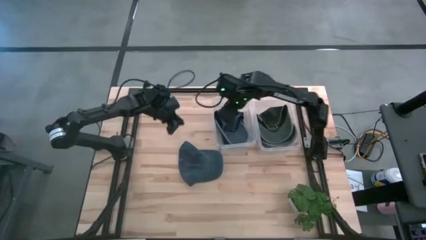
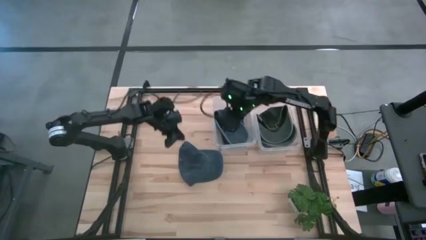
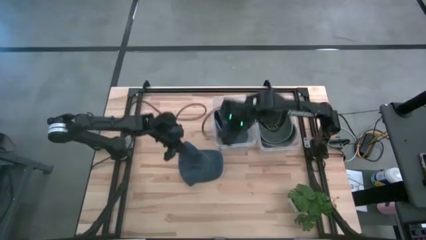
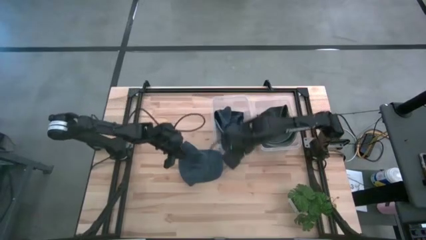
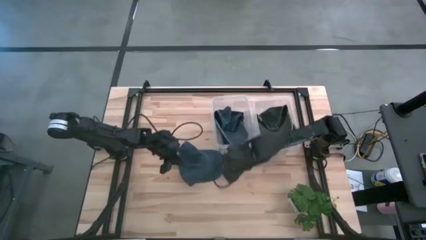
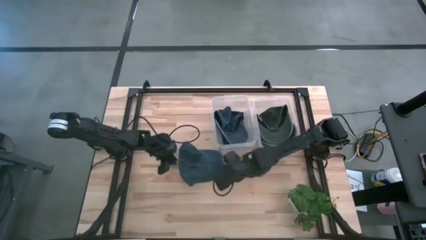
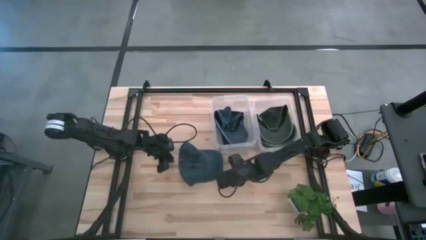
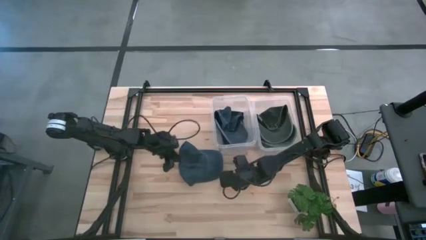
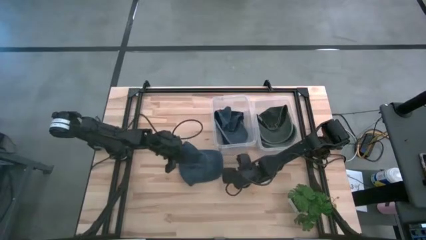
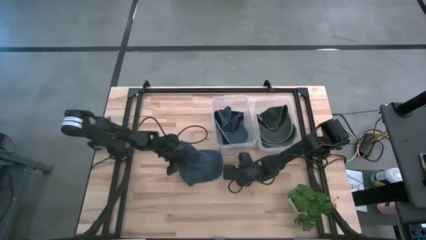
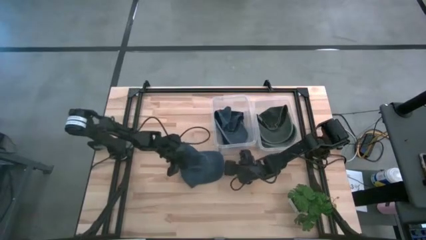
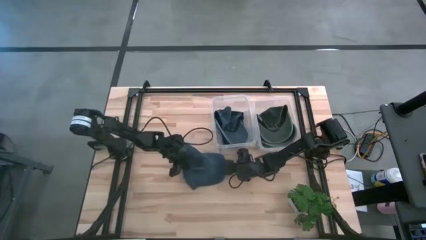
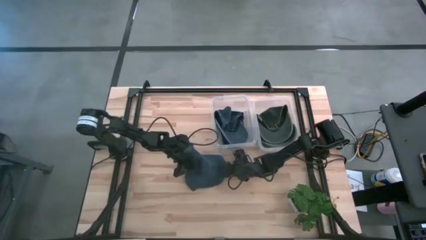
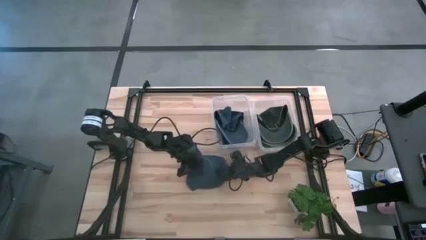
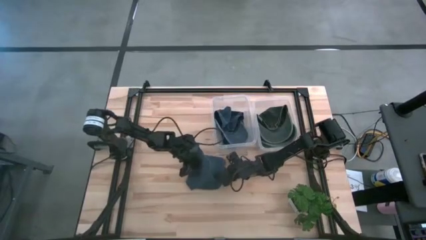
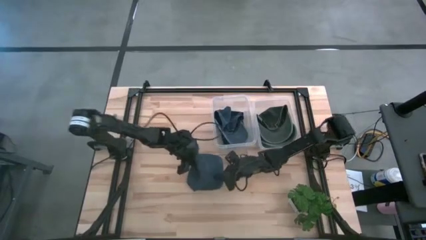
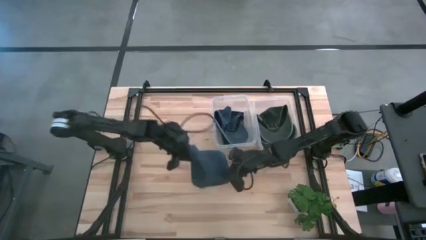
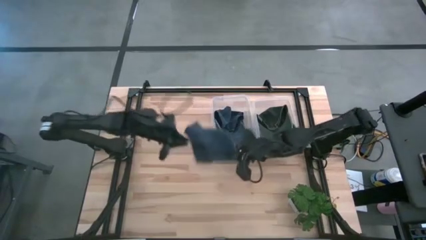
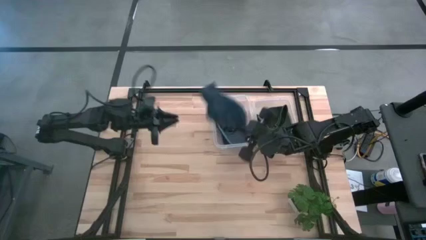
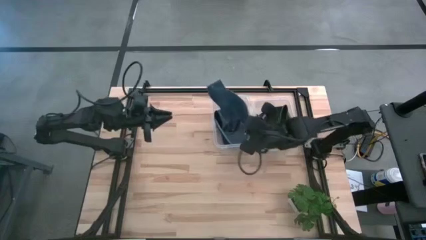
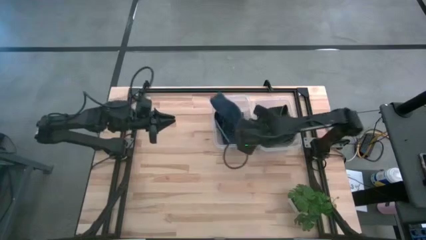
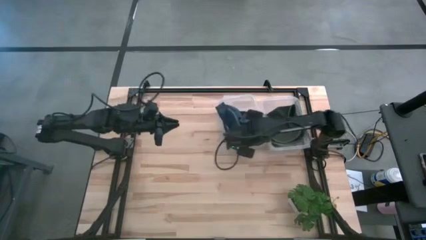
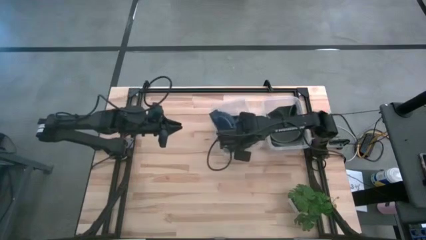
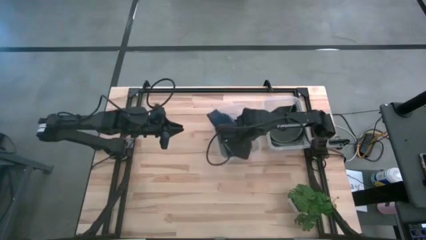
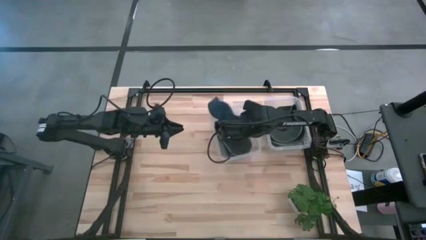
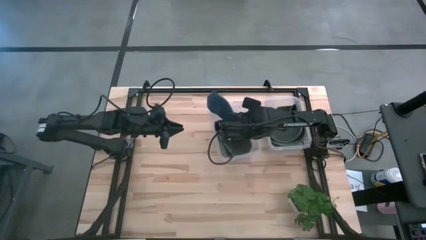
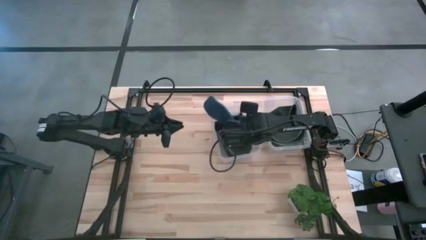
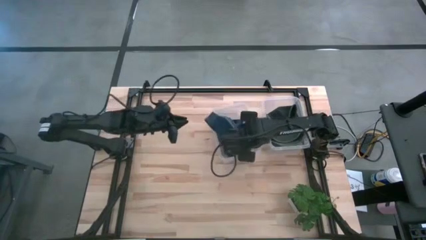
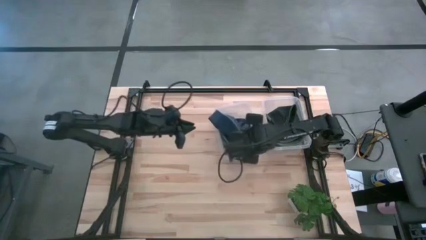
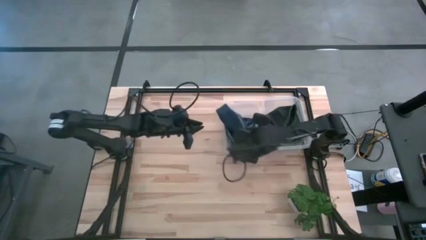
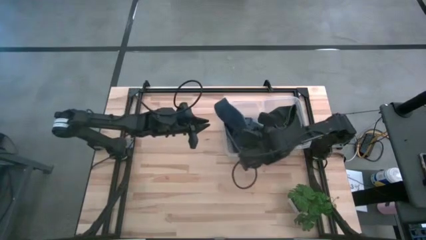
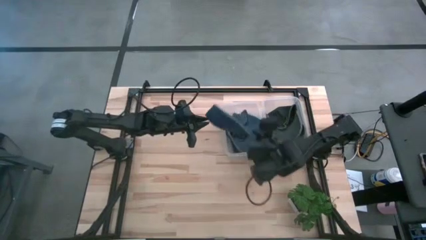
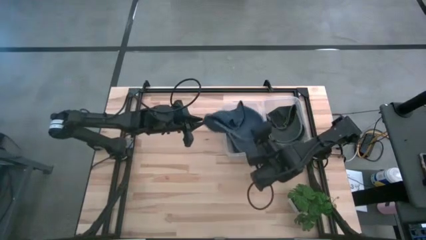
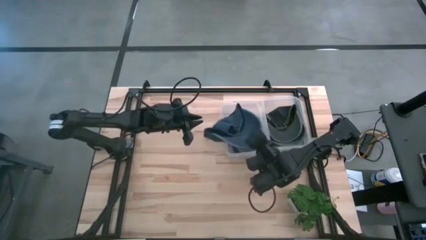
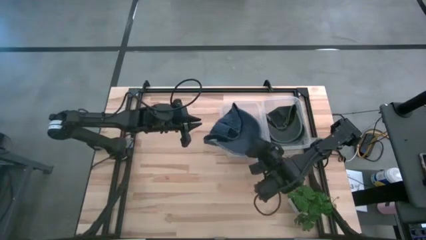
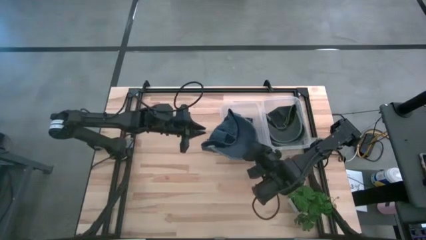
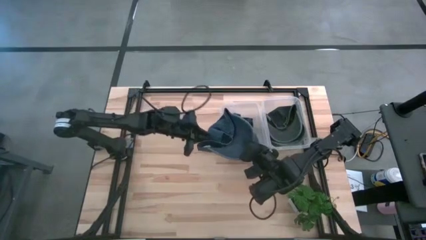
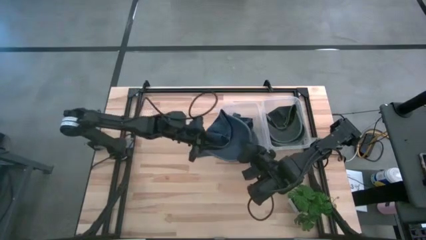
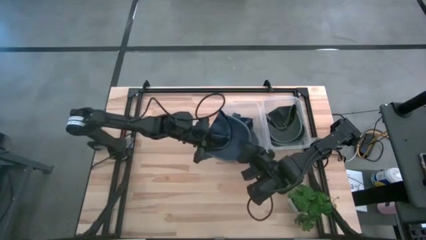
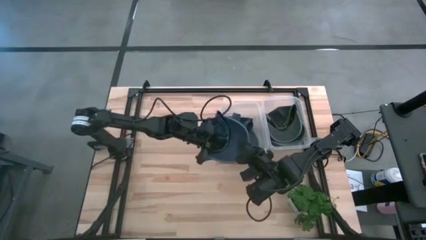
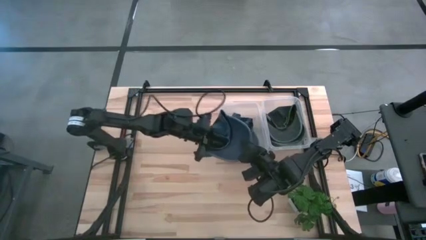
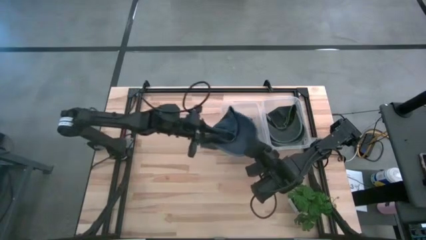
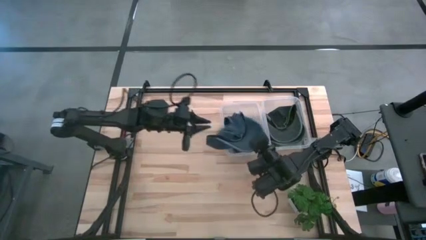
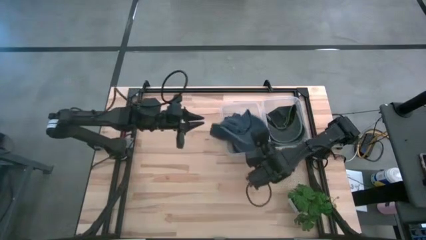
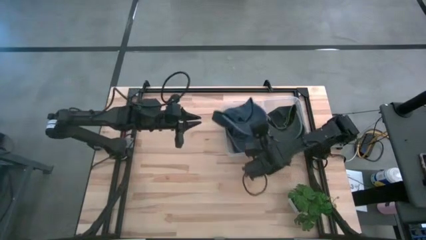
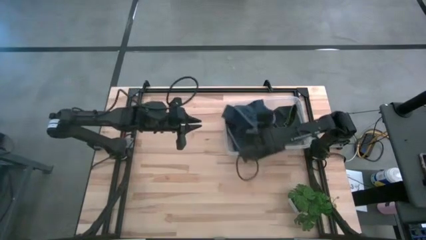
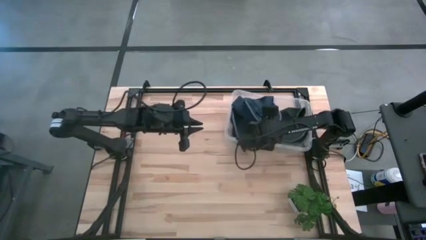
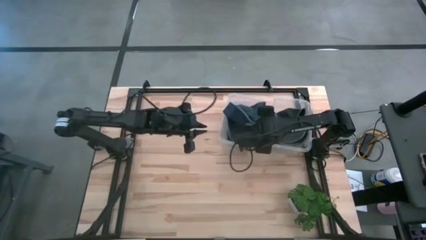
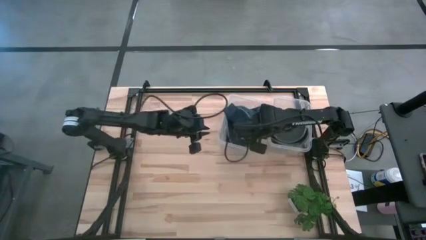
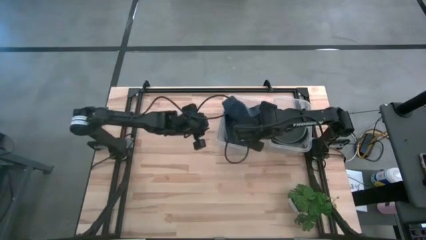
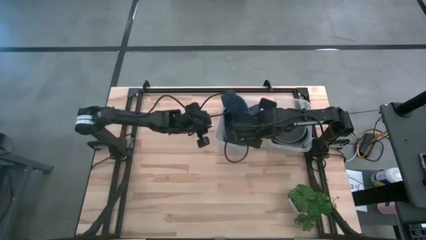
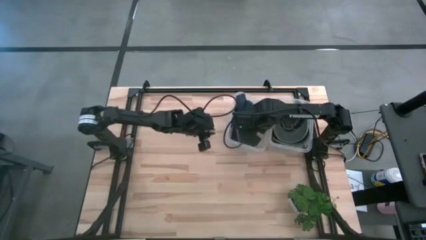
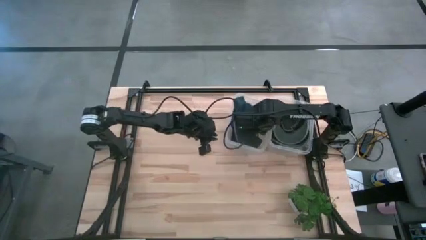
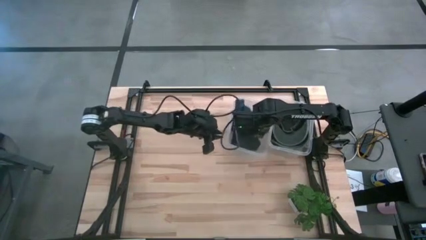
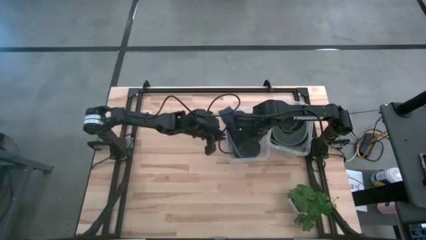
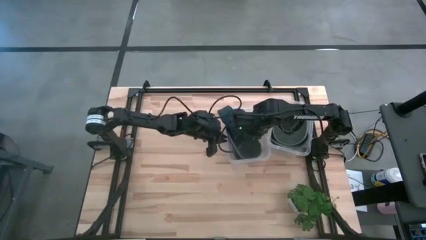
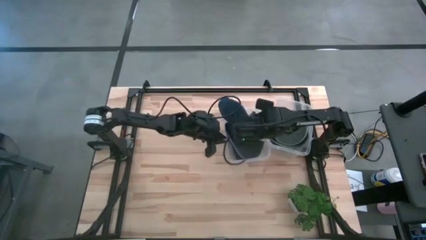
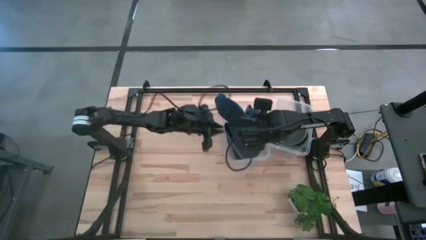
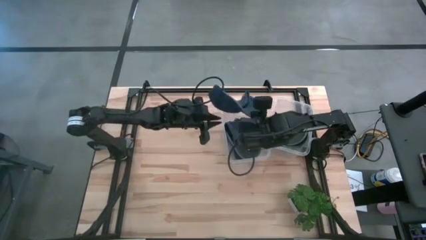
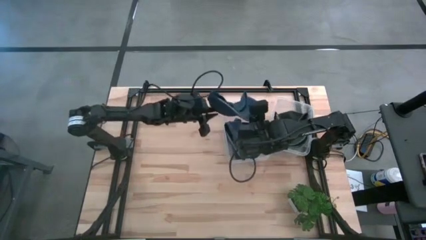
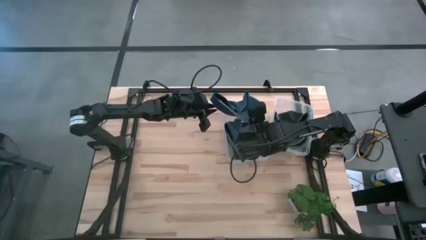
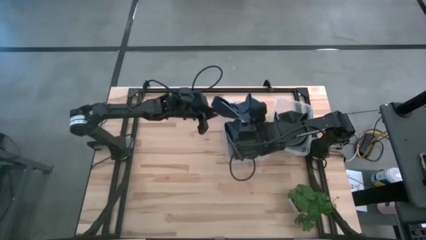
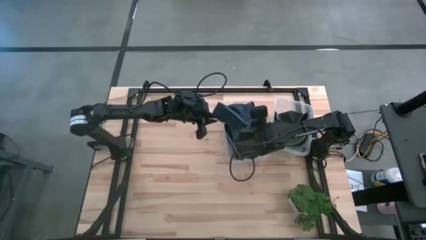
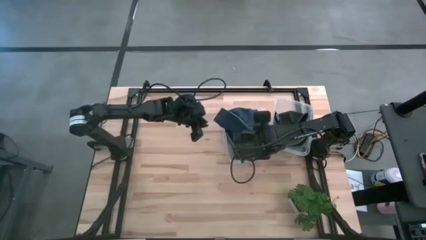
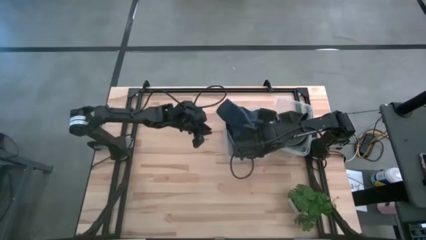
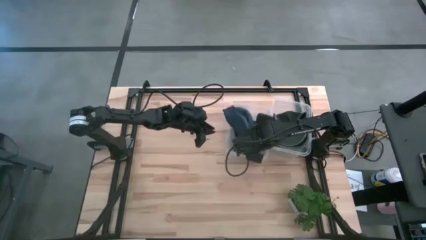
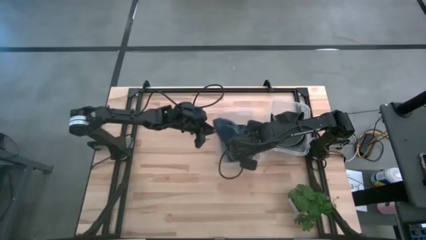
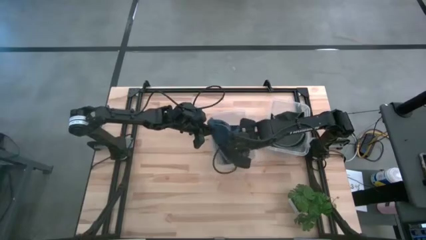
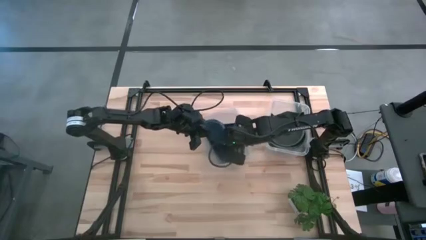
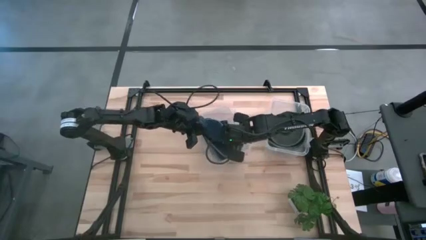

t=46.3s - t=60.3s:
Task: Pick & Place hat
Put the blue cap into the left transparent bin

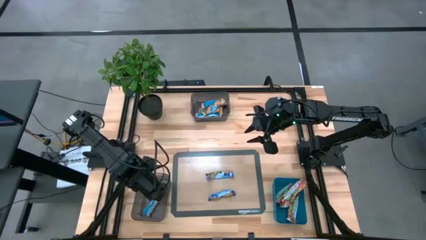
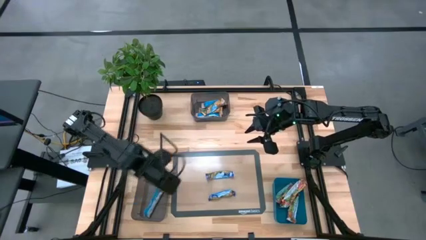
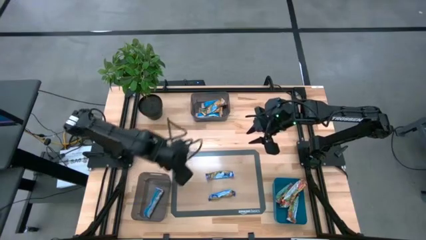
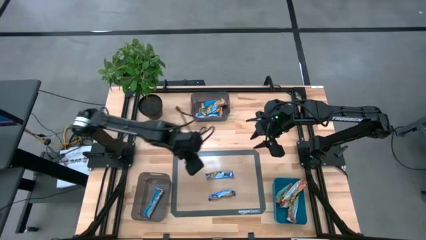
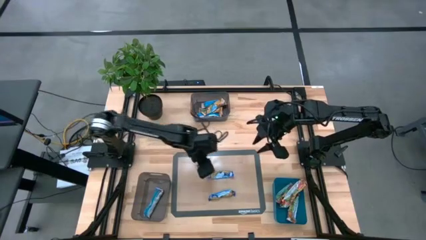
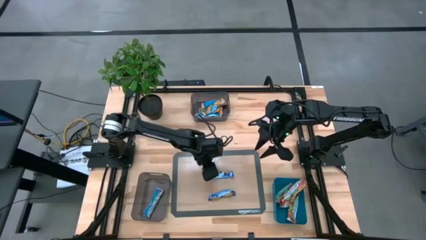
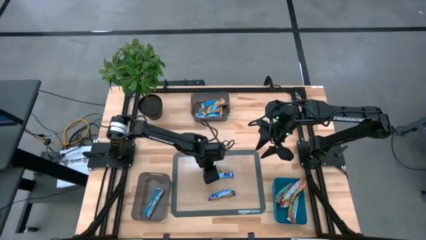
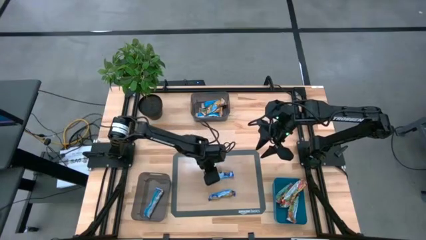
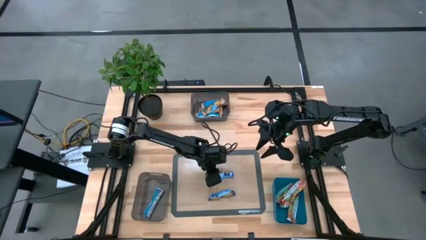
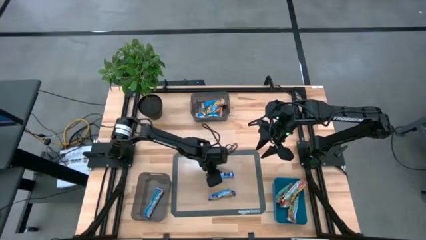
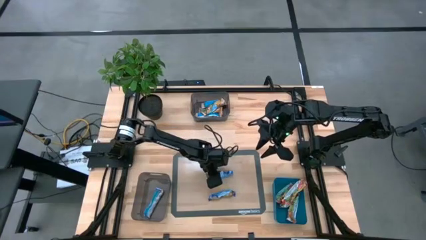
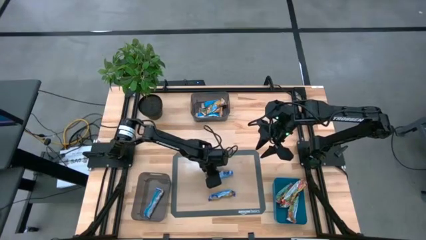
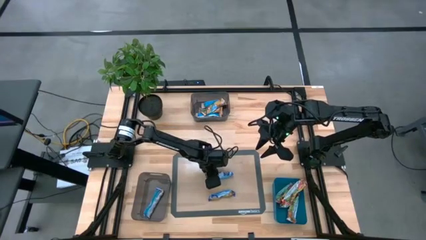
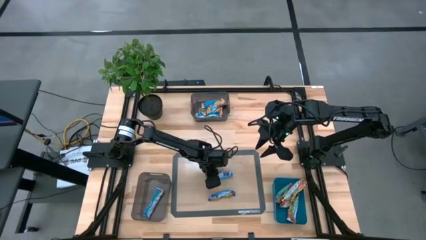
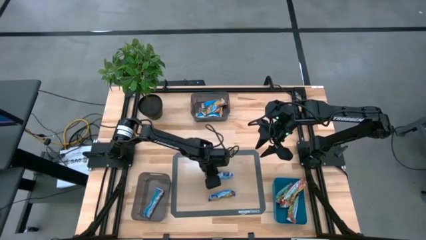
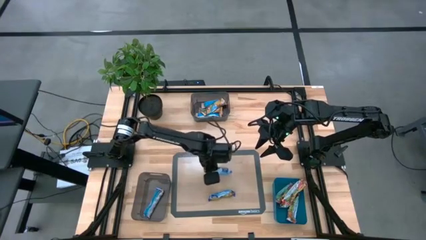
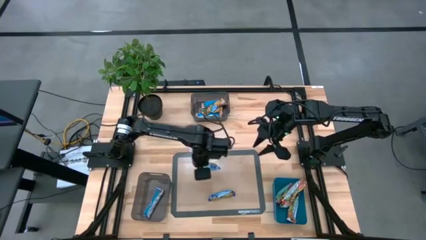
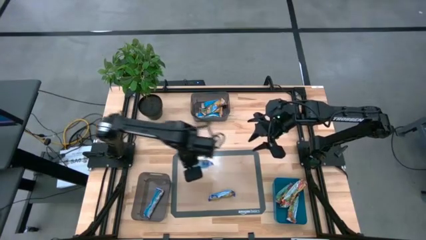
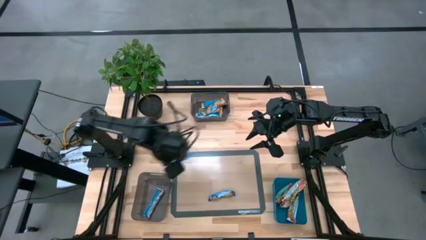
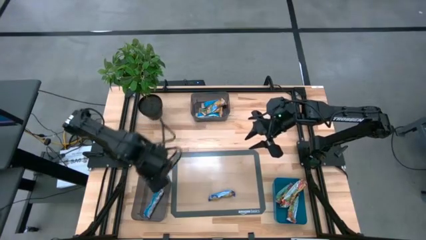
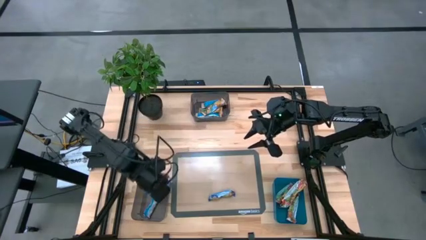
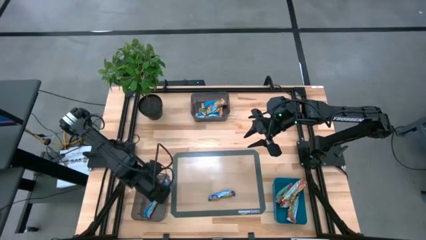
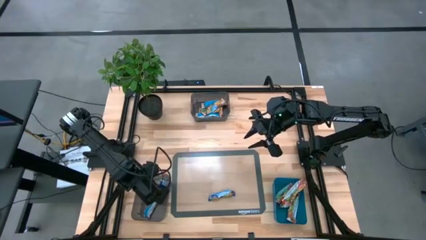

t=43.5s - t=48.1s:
Task: Pick and place Granola Bars by type
Put the blue granola bar into the bottom black transparent bin
